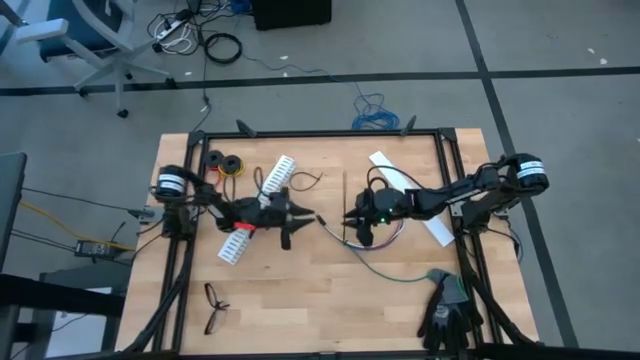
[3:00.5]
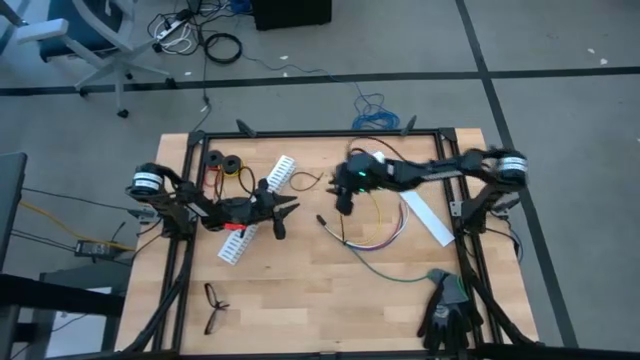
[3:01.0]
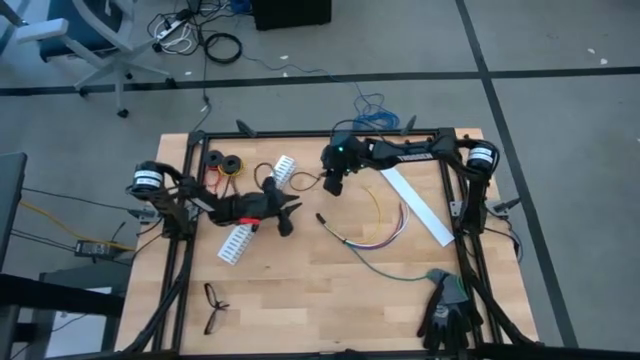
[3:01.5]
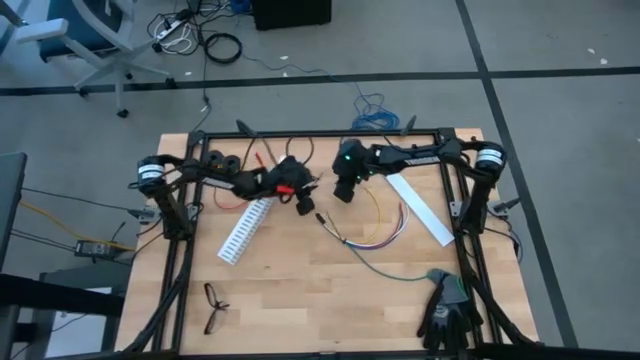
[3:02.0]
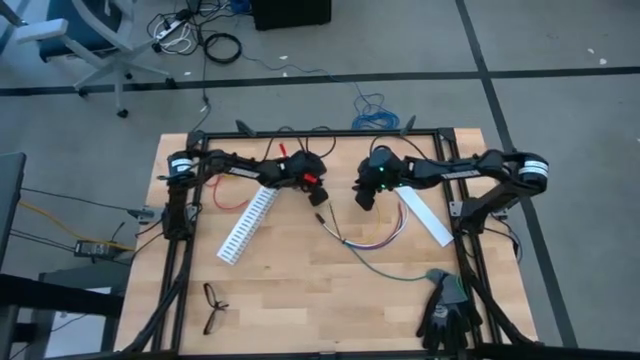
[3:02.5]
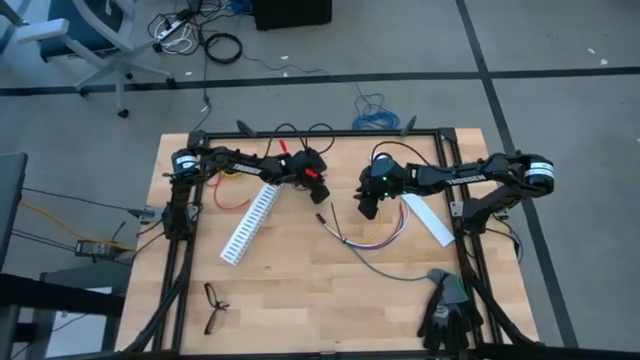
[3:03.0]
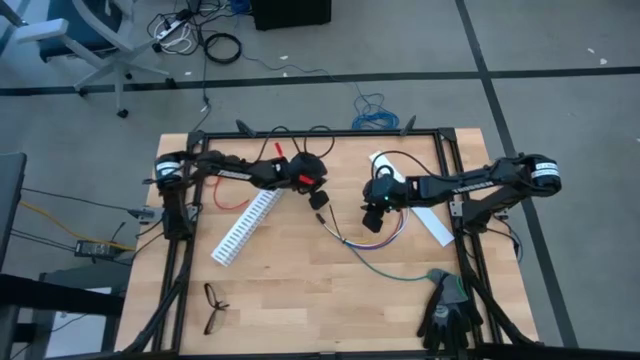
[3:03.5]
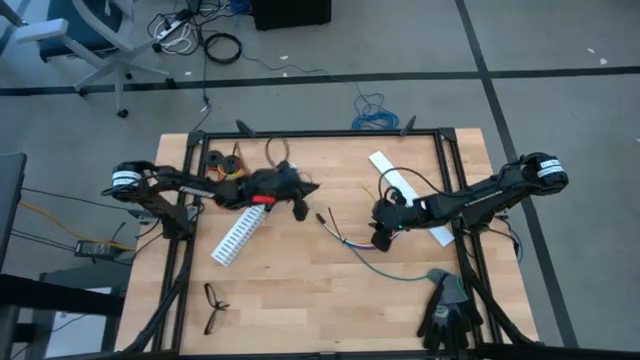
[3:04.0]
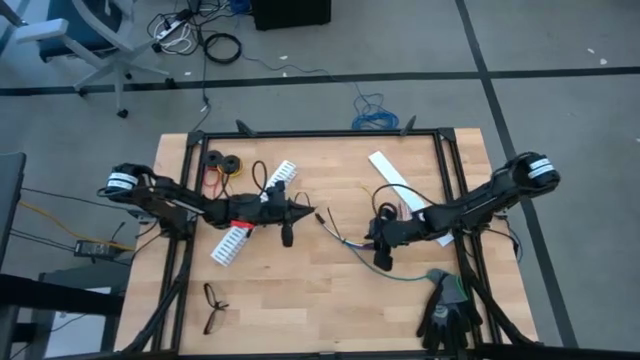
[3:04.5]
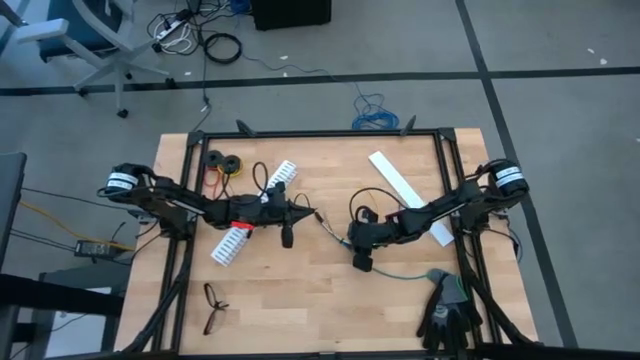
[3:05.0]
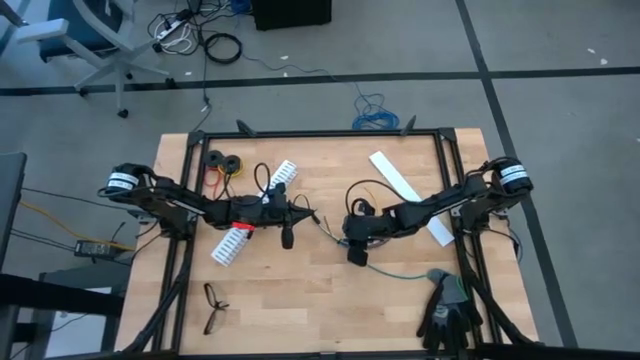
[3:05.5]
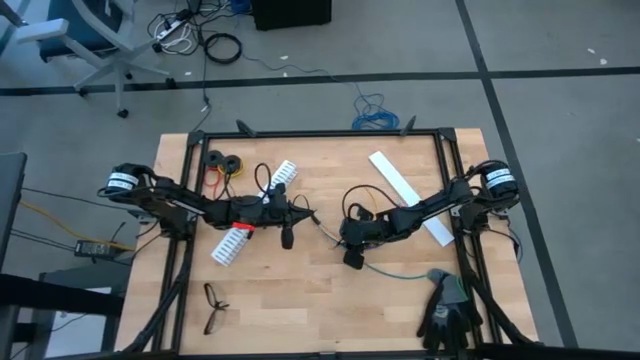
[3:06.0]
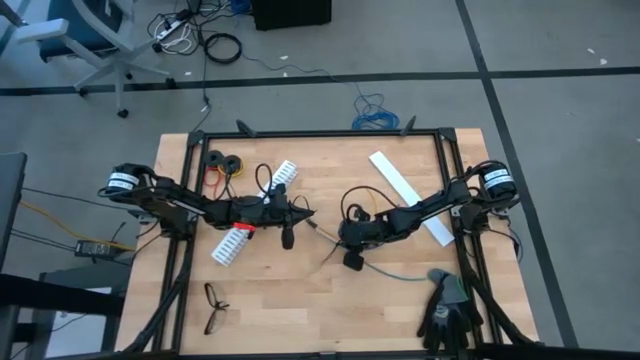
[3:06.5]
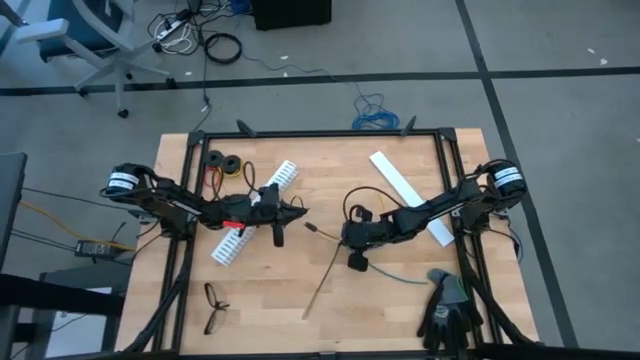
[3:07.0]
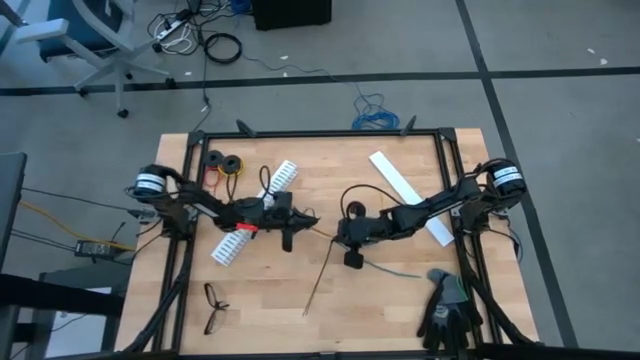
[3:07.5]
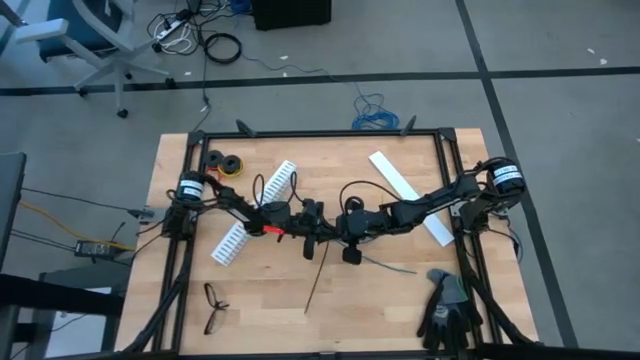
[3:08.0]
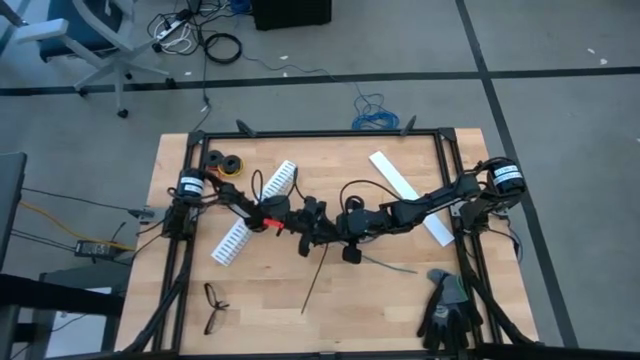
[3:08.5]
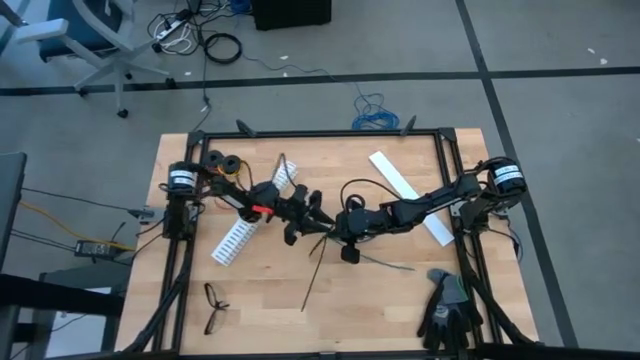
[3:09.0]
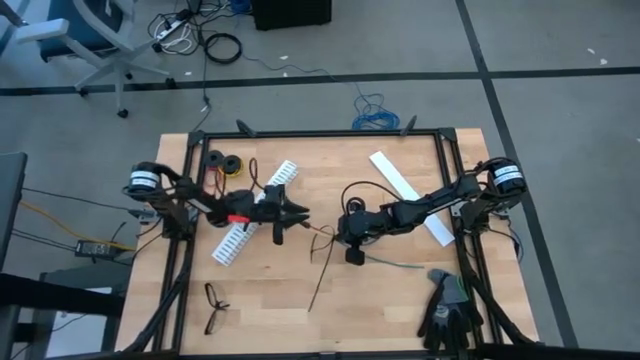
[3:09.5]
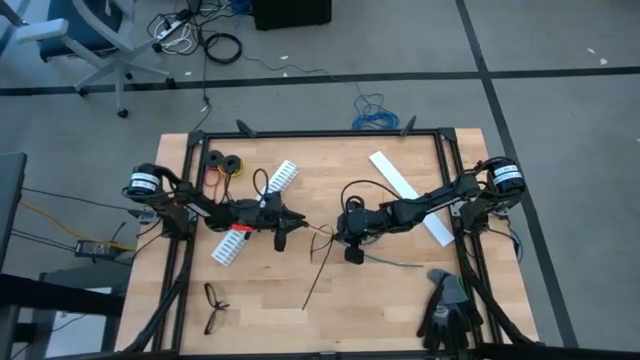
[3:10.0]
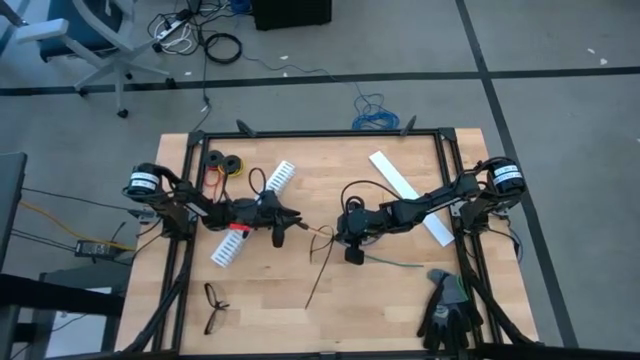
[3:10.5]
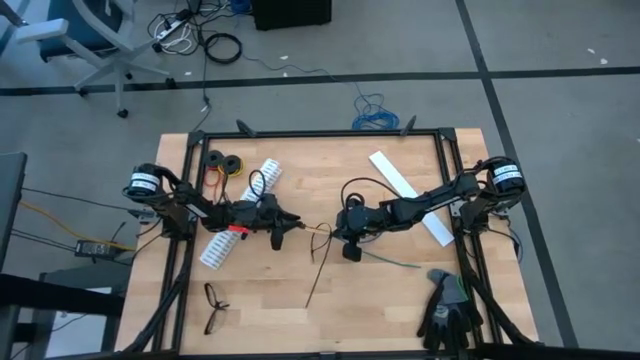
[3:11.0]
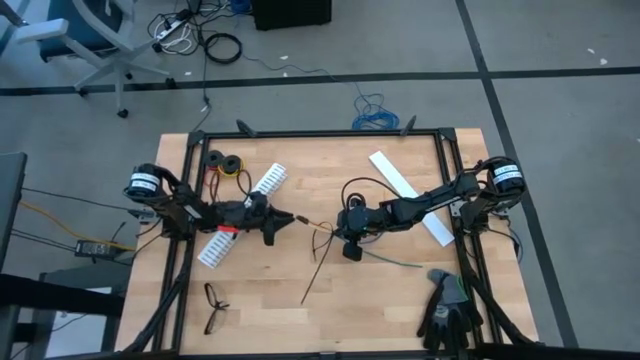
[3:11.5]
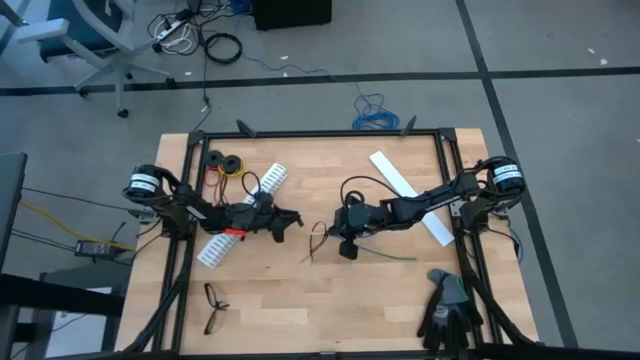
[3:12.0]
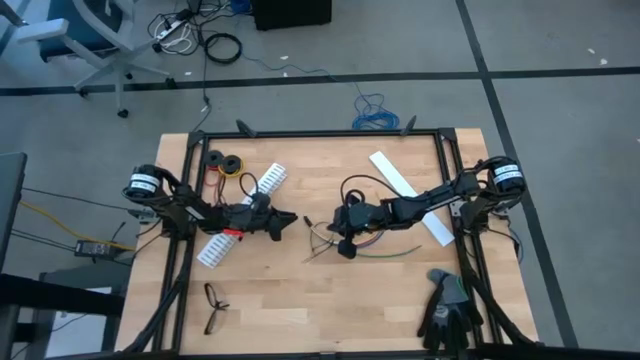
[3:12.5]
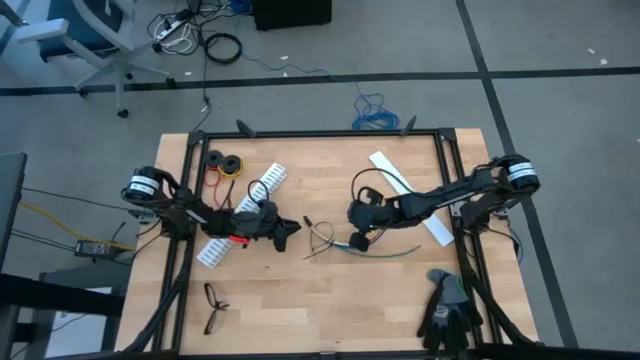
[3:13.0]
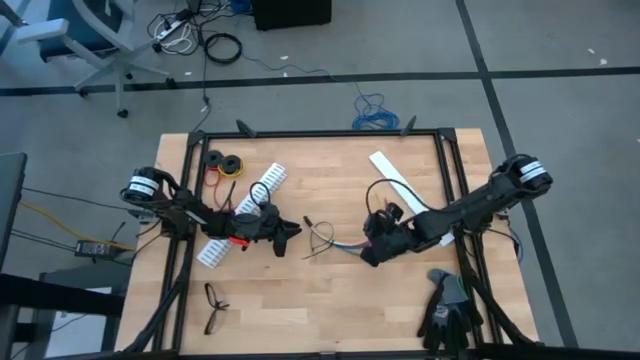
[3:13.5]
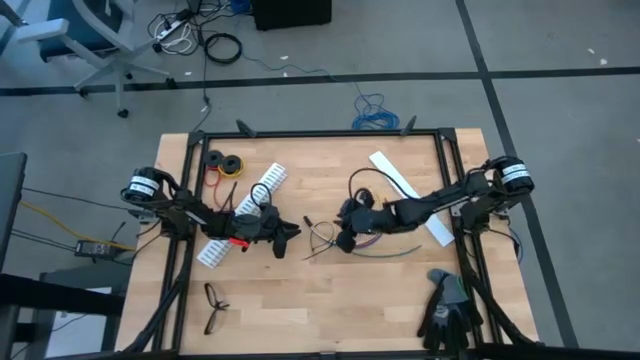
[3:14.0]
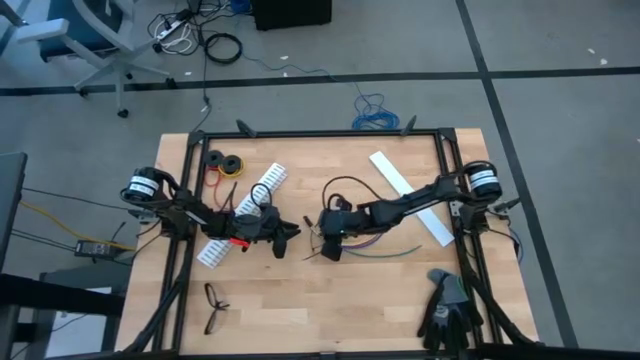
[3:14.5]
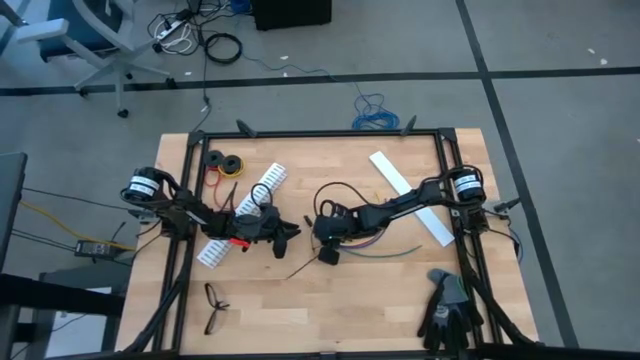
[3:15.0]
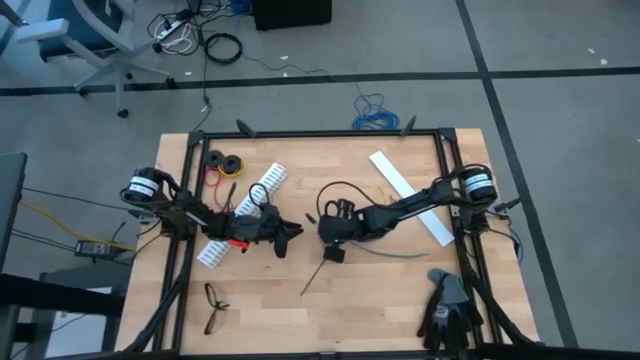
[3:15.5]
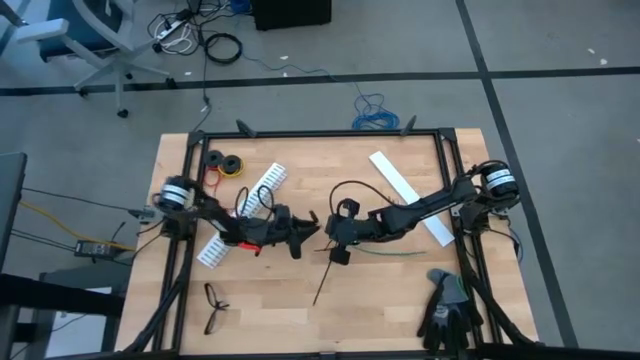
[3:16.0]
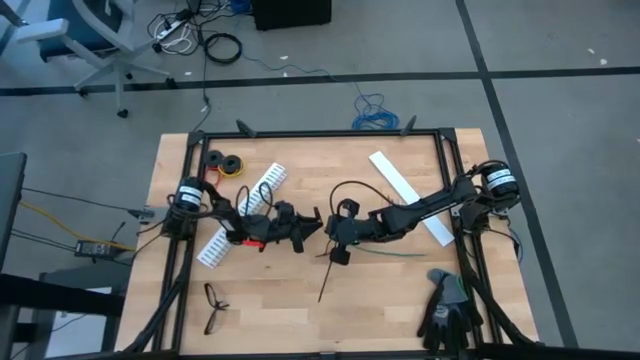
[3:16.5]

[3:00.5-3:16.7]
Task: Ziptie cables
Wrap the cable wires with the black zip tie

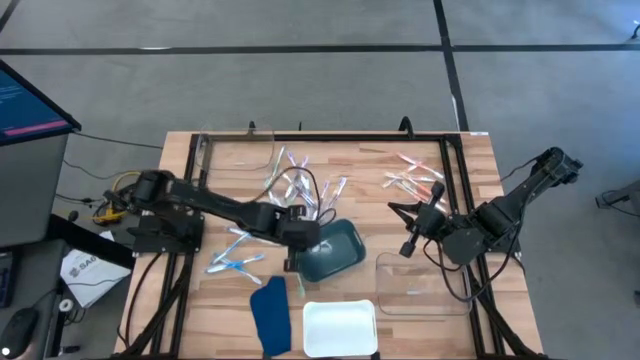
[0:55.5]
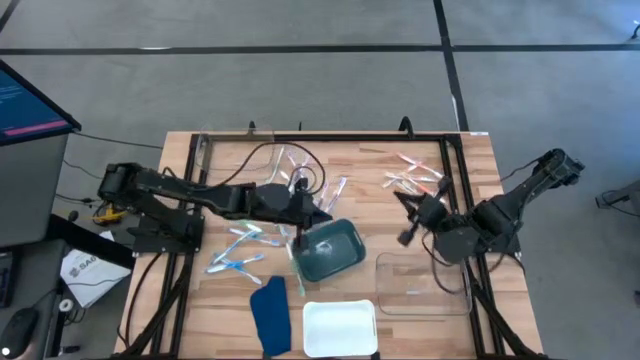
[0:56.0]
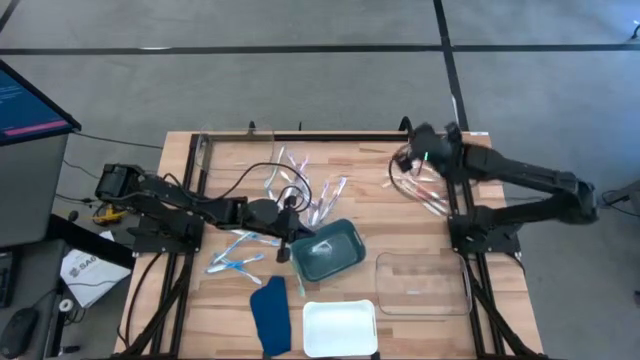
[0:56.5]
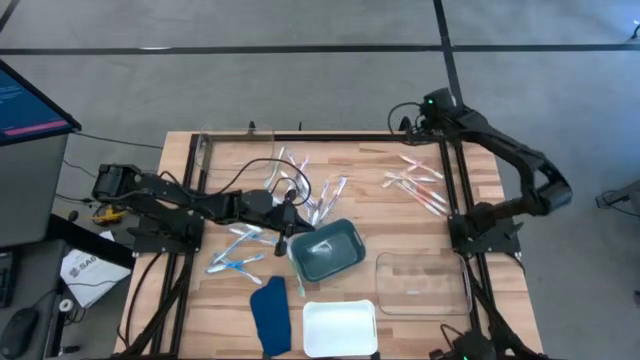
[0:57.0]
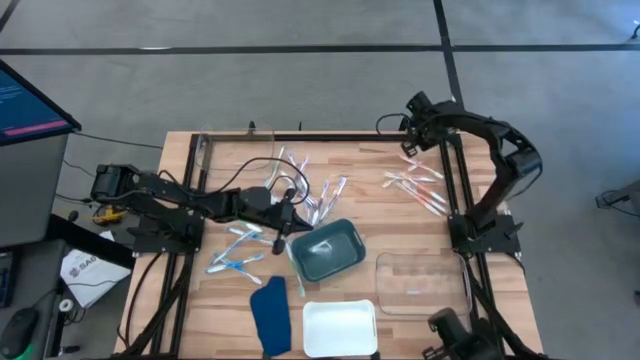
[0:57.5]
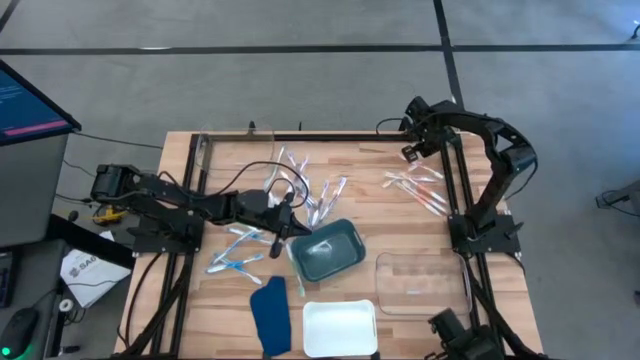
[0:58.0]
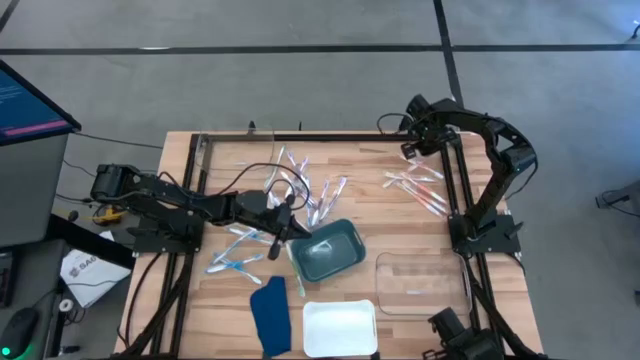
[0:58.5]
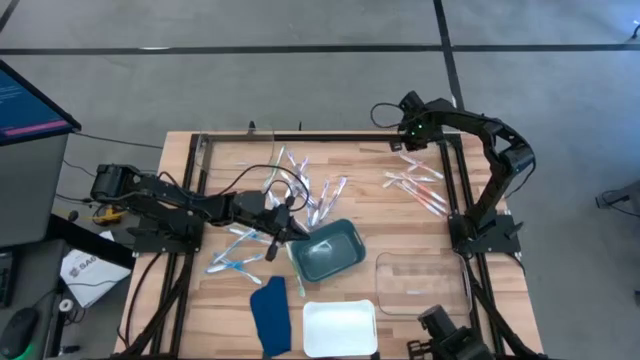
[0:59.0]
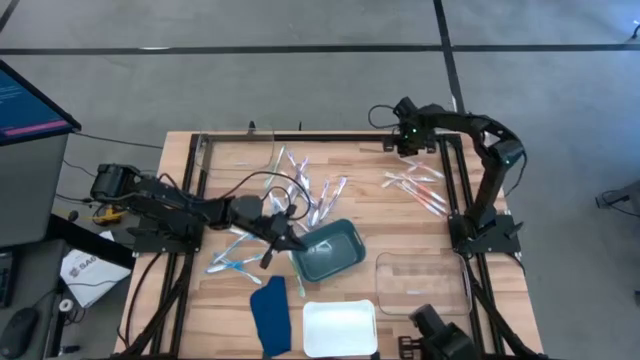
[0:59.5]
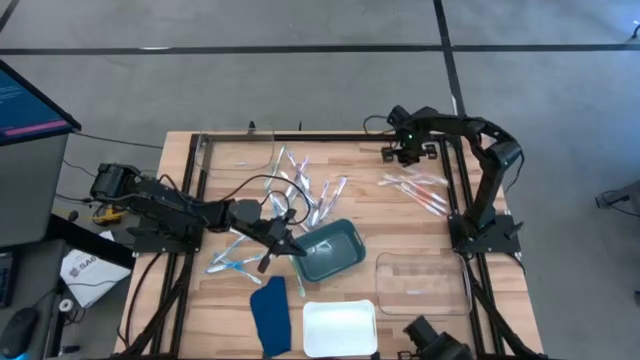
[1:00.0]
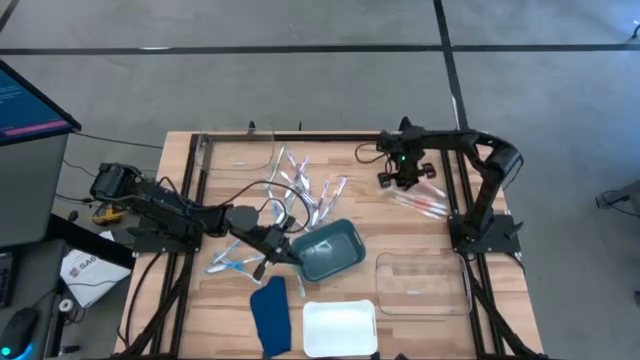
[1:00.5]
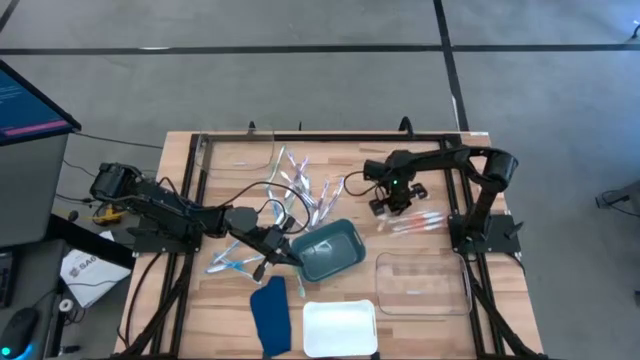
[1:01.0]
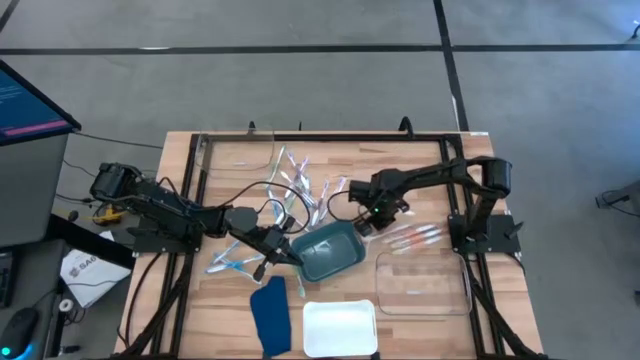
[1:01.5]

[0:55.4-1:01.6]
Task: Pick & Place Toothbrushes
Adjust the orange toothbrushes
